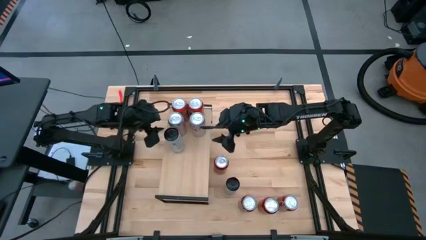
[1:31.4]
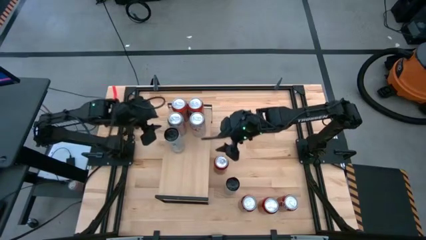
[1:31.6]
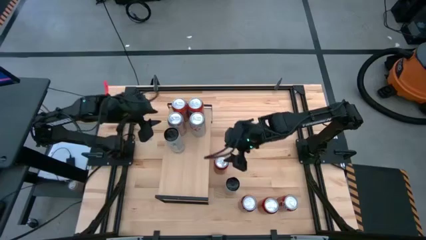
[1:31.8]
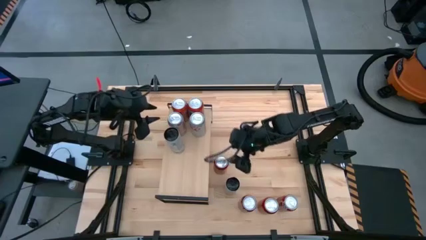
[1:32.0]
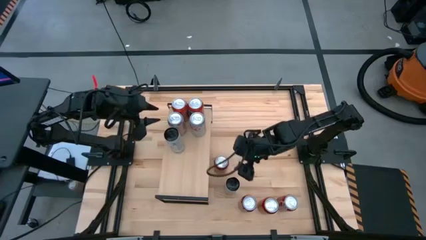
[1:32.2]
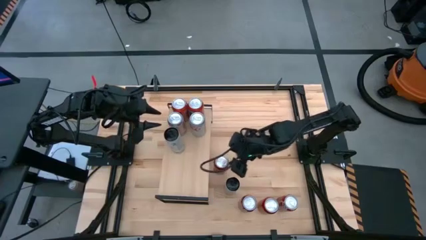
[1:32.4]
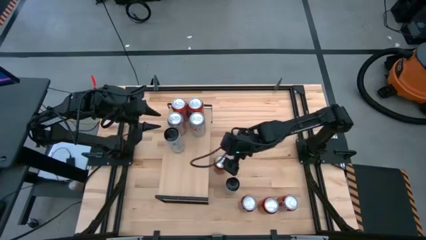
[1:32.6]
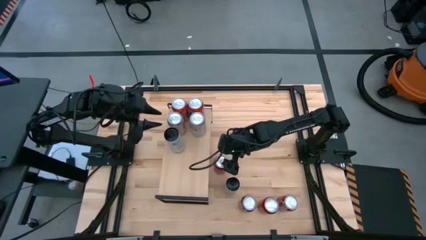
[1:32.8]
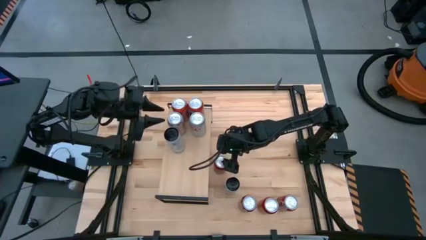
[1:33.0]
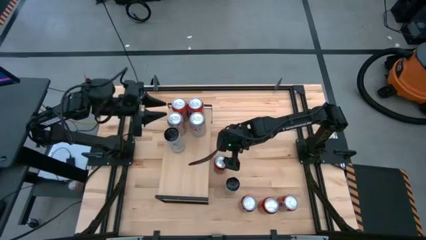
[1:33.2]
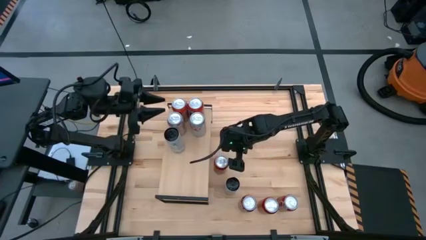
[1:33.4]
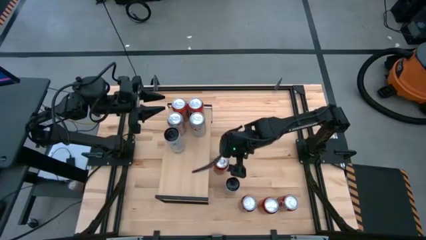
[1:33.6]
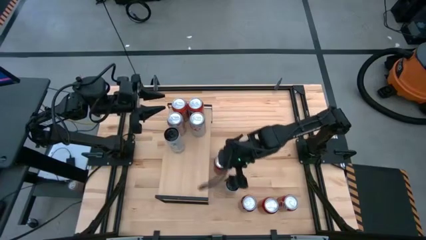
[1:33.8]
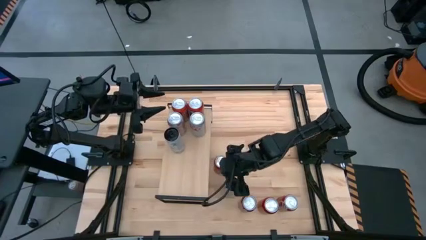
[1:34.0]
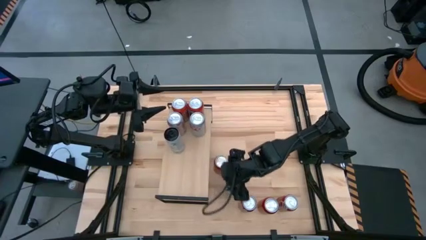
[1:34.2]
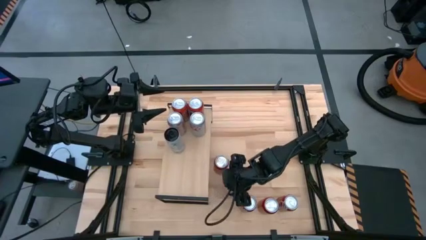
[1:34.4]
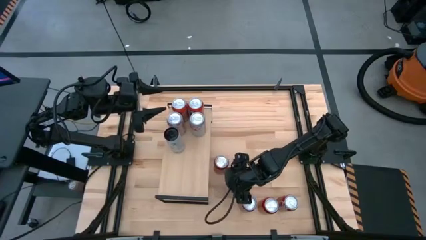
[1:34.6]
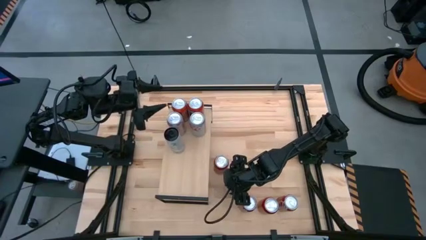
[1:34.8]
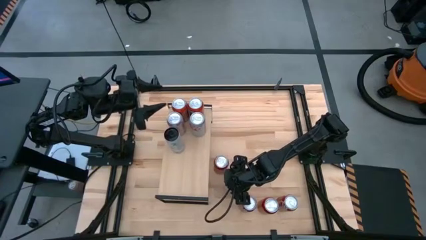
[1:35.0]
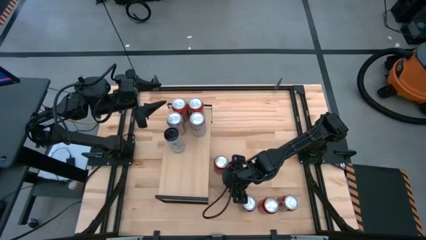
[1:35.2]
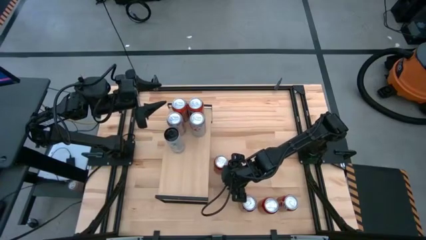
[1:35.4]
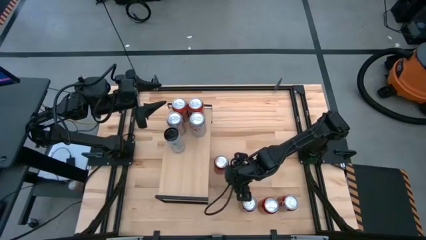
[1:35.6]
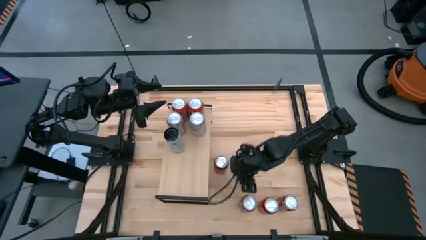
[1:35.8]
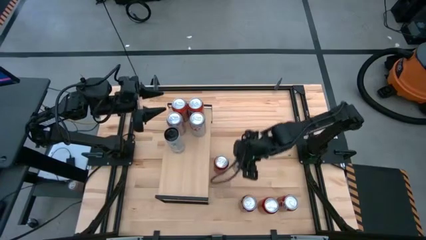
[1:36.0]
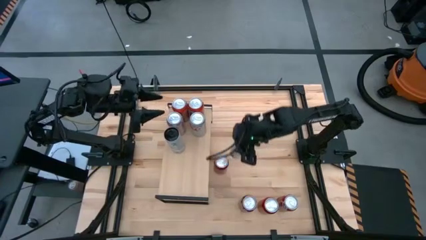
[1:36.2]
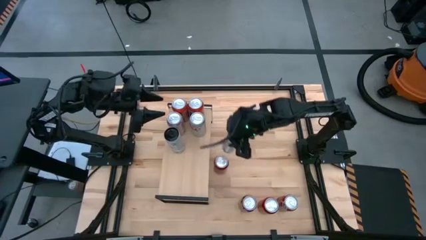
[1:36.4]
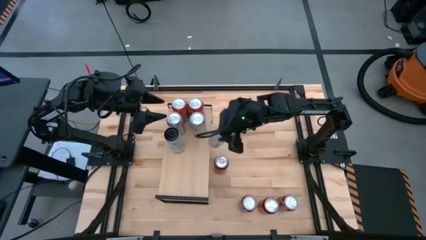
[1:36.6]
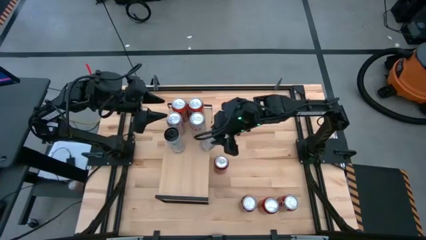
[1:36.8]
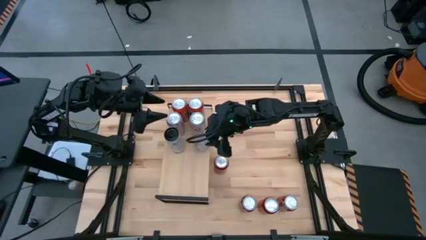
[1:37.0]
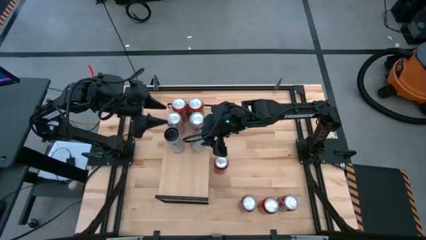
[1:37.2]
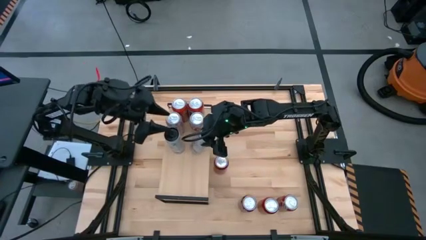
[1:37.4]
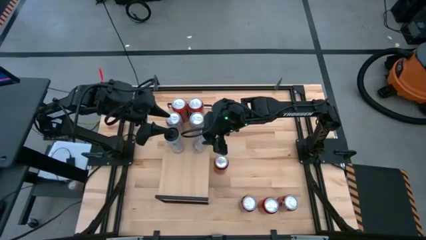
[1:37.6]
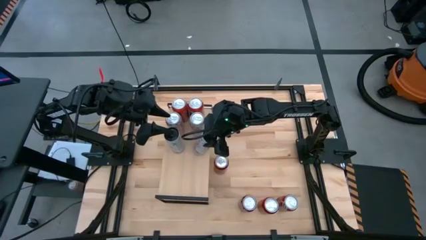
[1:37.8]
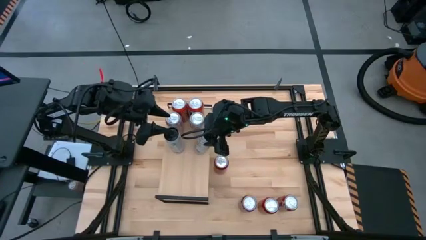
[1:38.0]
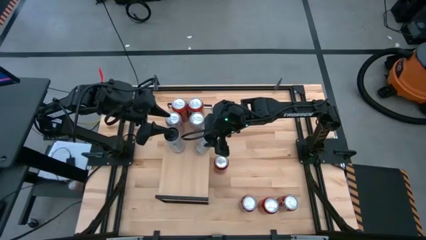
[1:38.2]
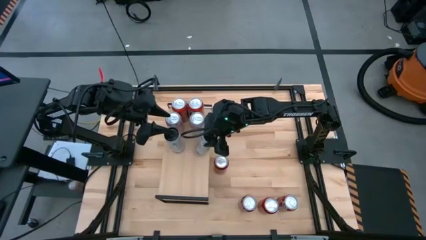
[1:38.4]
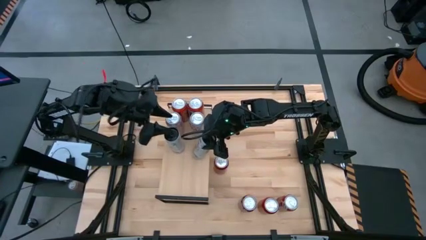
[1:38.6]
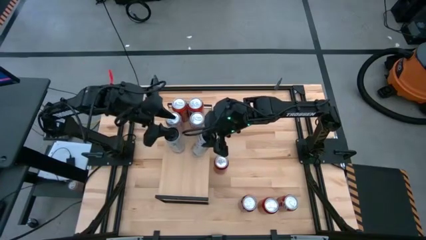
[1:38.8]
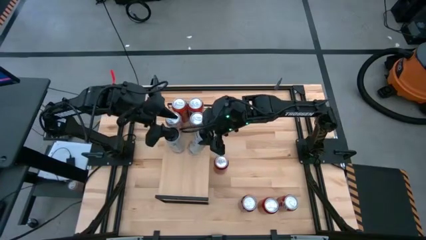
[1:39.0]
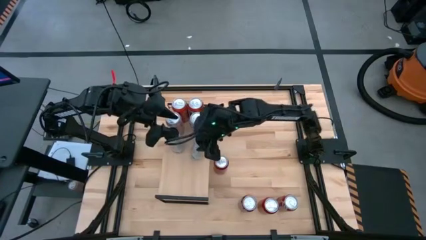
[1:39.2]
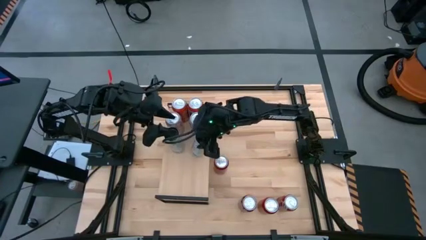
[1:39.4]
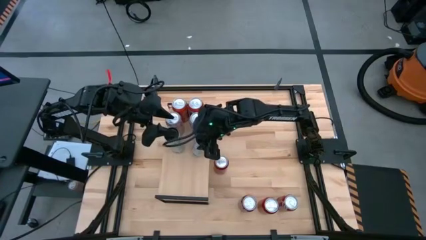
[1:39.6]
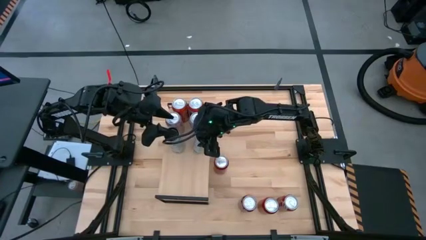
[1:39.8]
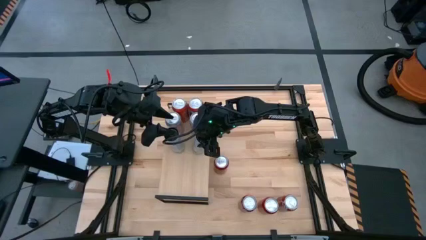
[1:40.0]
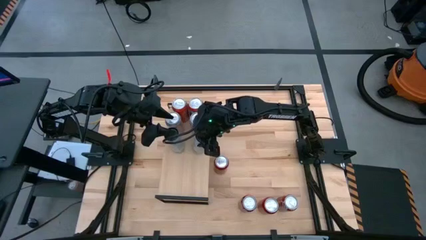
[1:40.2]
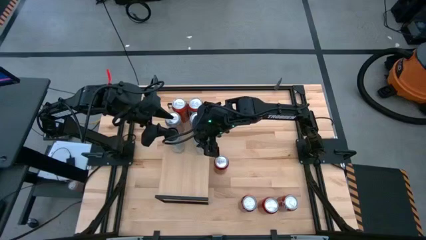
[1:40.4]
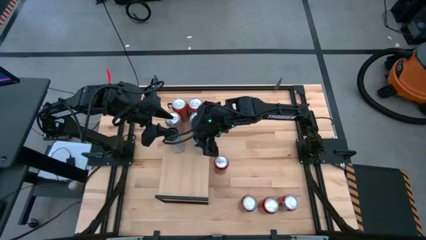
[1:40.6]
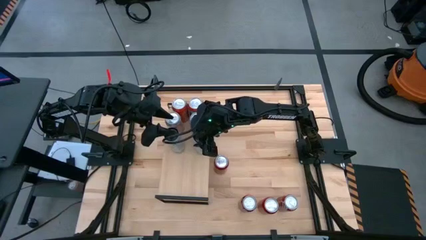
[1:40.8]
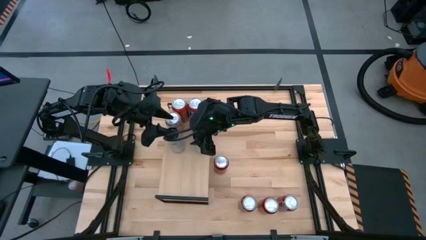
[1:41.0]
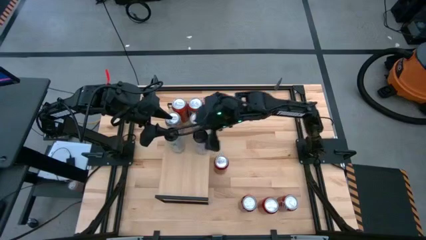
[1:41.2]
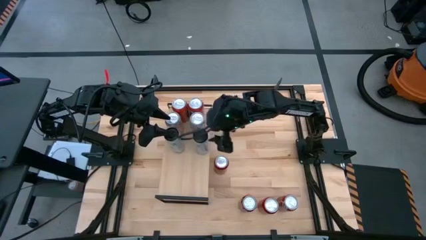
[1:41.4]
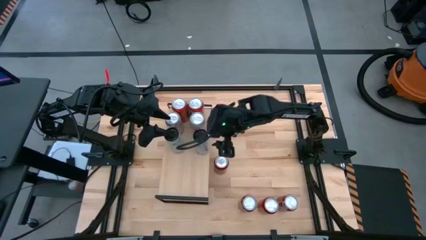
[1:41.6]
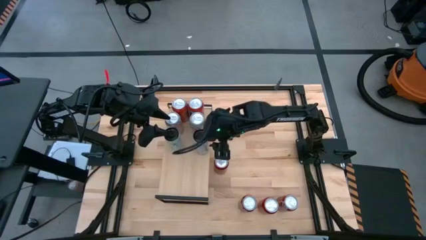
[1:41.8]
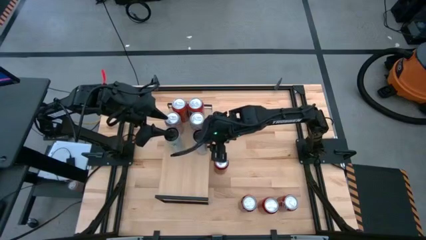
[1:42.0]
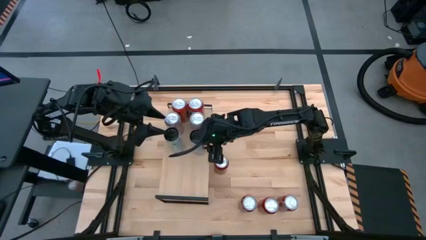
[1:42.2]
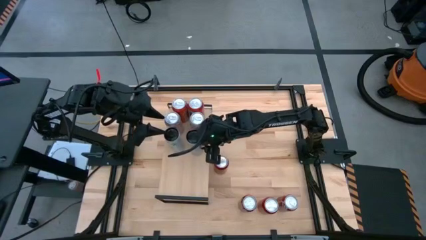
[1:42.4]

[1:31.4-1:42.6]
Task: Pick and place cans onto a shelf
Put the white-pink soda can on the shelf aligned with the other white-pink soda can

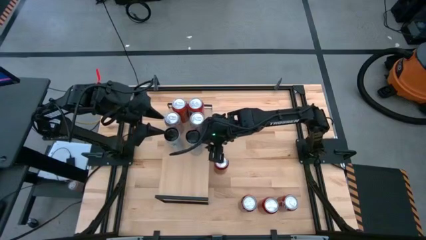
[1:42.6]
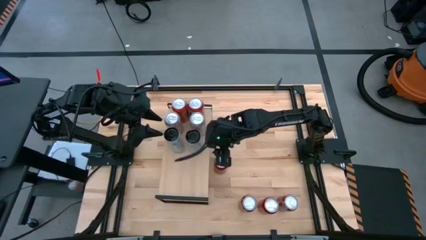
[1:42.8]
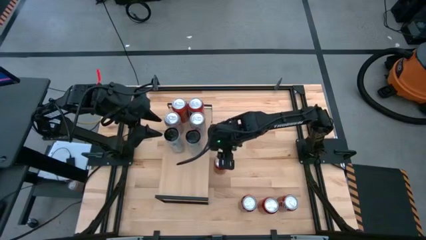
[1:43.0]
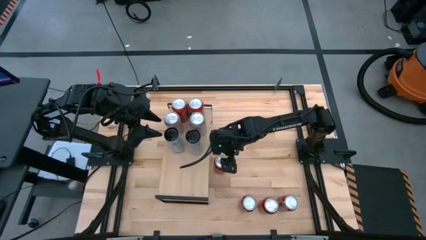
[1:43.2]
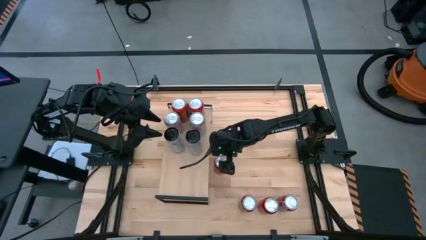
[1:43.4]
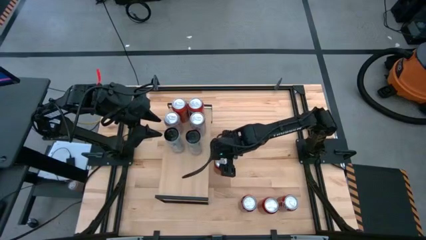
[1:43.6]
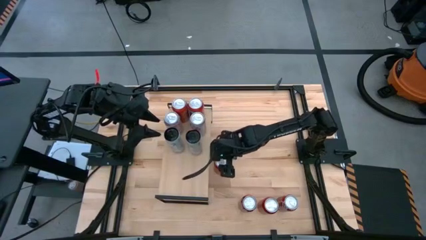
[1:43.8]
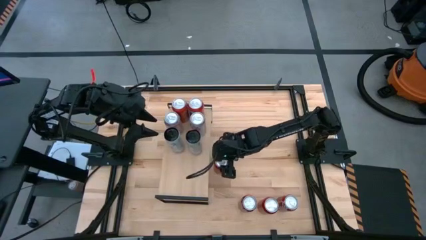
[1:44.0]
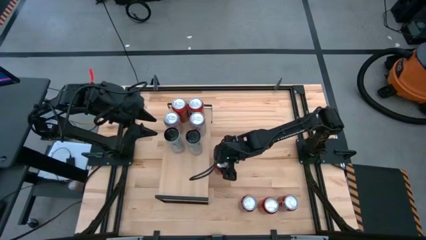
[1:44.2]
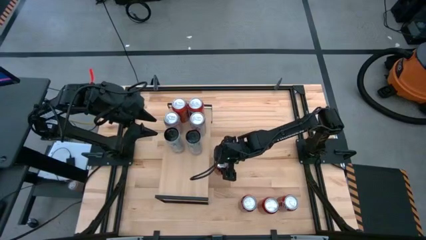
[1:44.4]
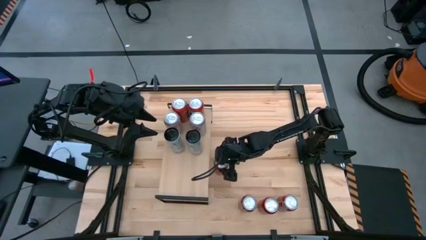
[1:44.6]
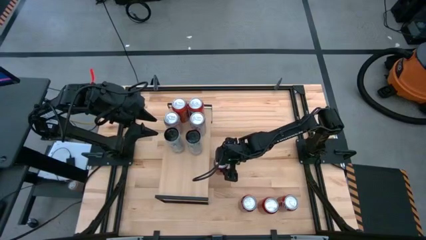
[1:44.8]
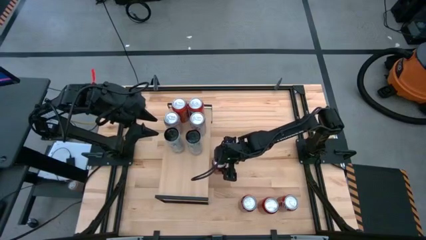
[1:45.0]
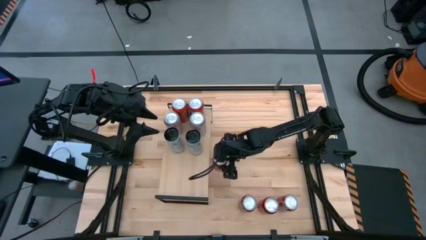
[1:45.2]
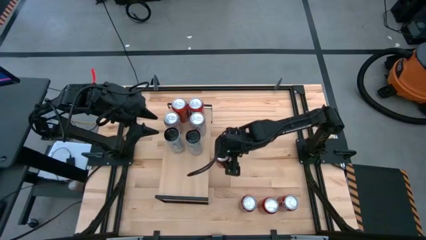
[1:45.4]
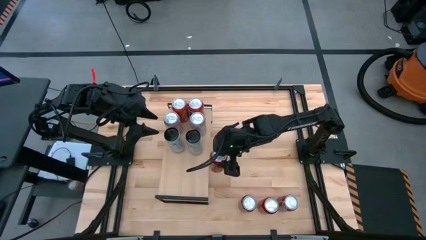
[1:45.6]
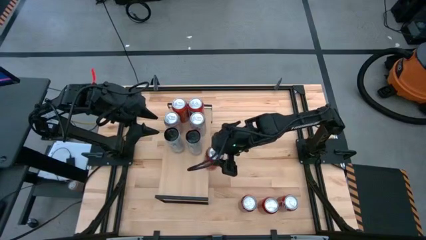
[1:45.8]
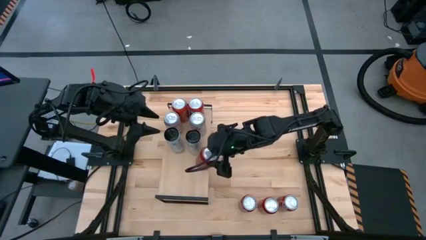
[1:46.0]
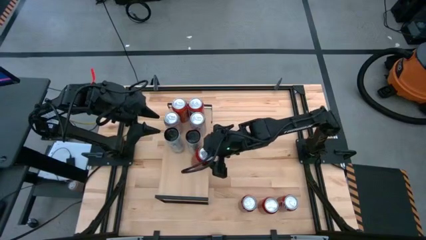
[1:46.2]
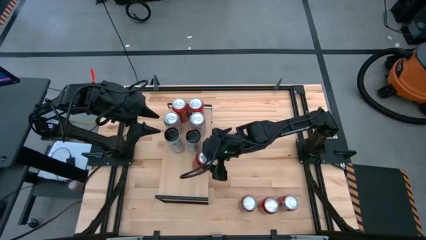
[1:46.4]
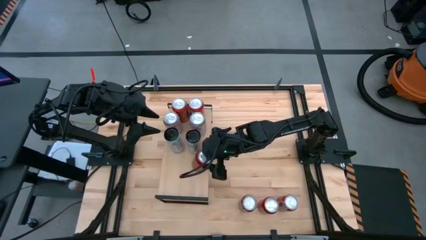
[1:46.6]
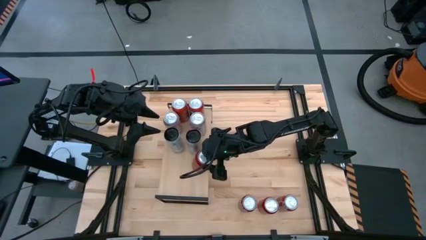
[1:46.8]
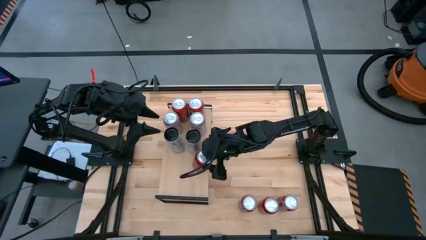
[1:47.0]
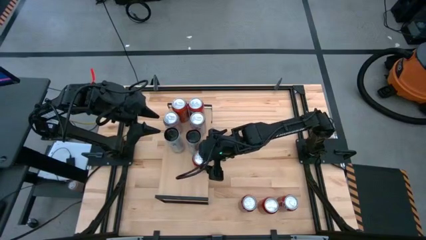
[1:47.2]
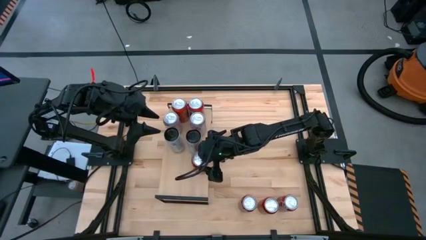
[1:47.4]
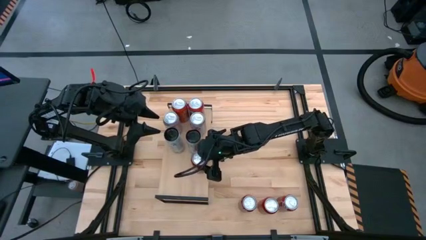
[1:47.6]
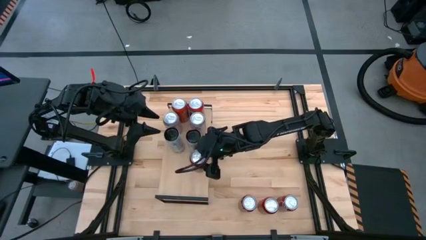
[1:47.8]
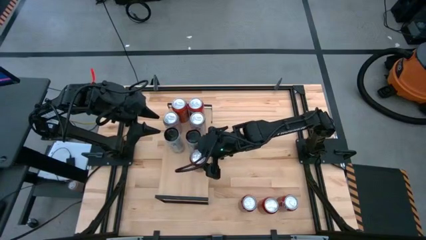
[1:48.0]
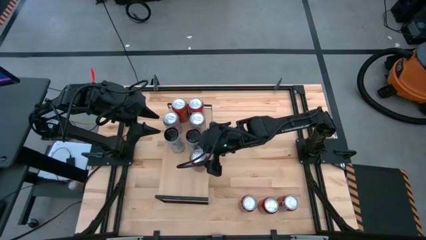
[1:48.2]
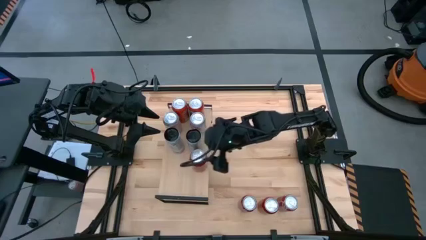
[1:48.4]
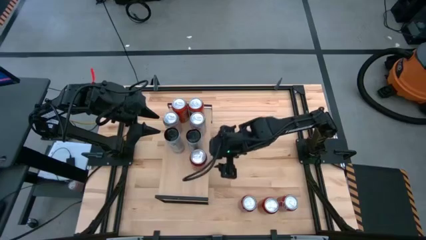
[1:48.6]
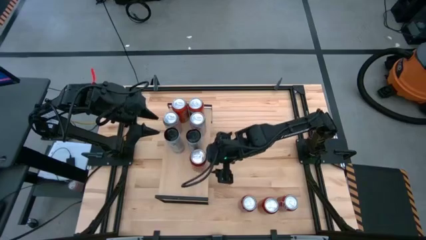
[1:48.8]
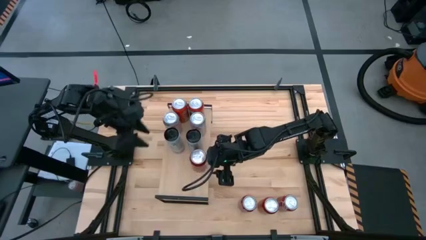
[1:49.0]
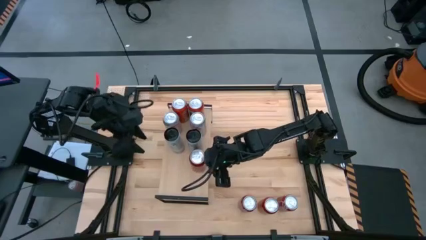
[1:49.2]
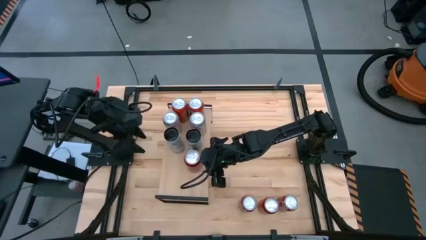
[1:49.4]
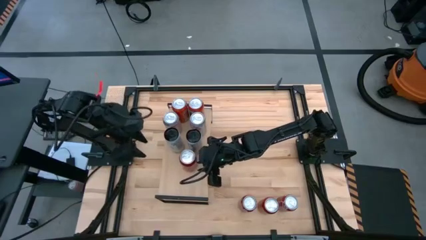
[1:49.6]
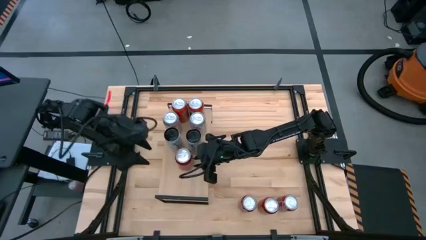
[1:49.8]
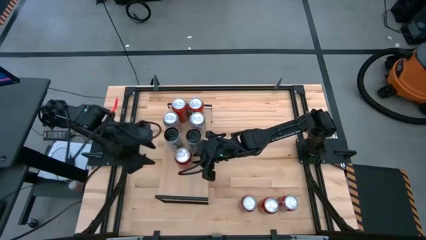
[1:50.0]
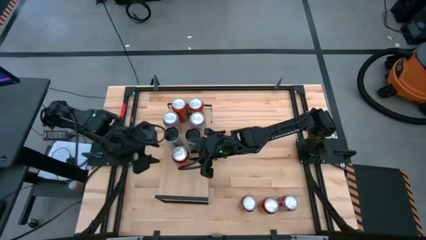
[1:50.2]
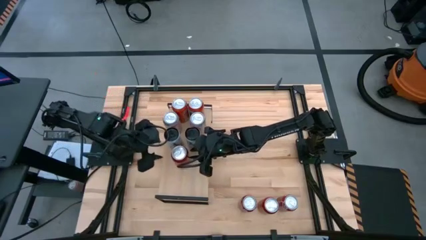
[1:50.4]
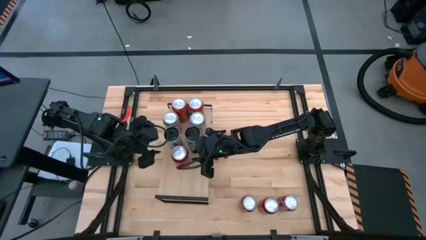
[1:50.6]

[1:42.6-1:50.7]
Put the top red-black soda can on the shelf
